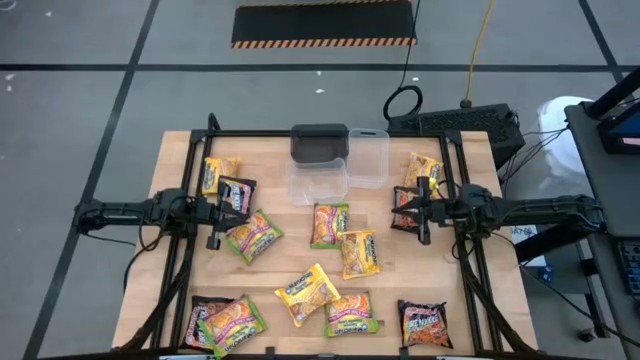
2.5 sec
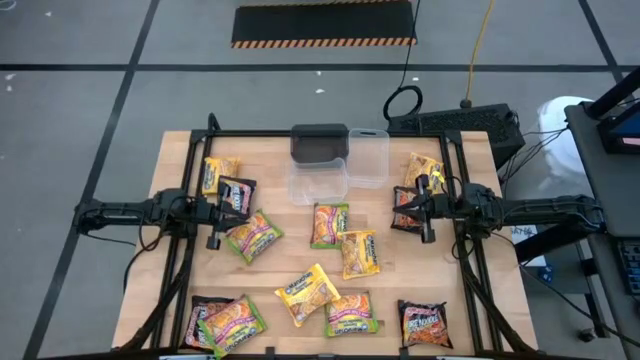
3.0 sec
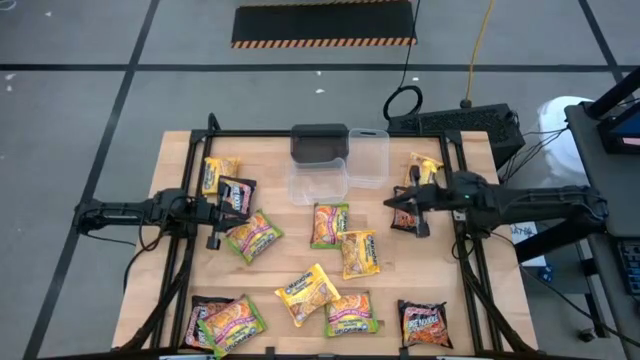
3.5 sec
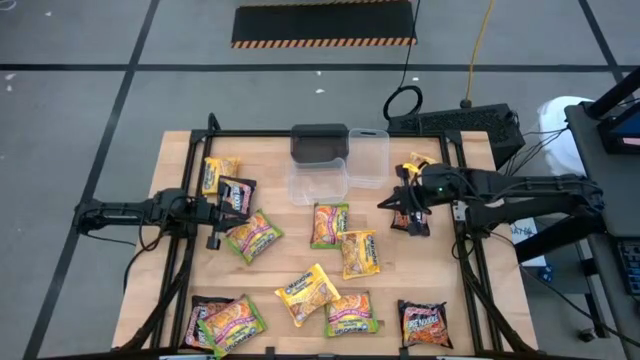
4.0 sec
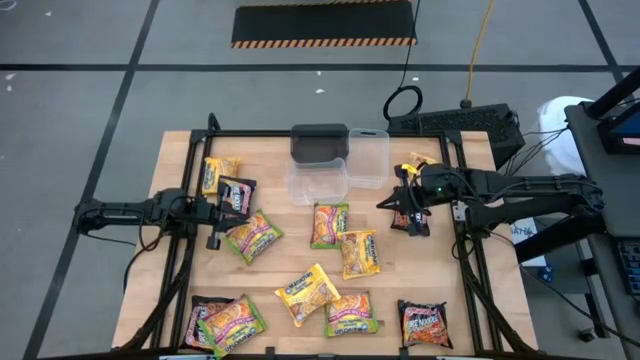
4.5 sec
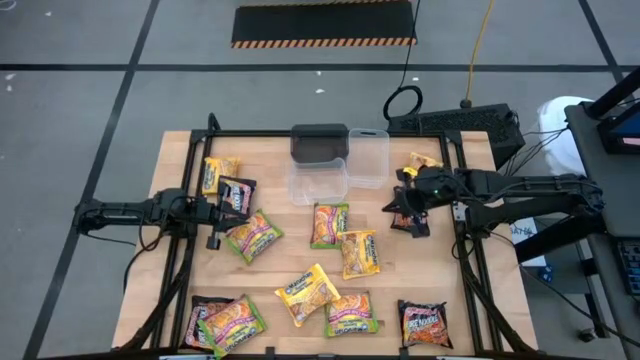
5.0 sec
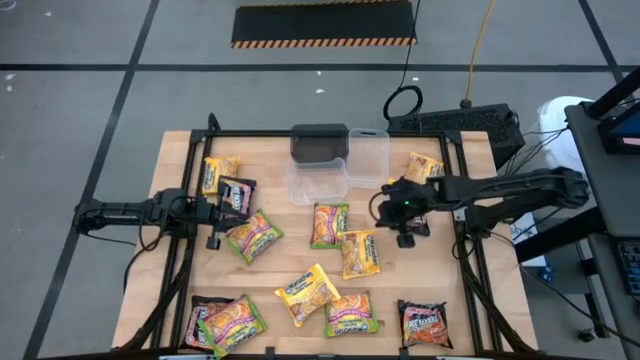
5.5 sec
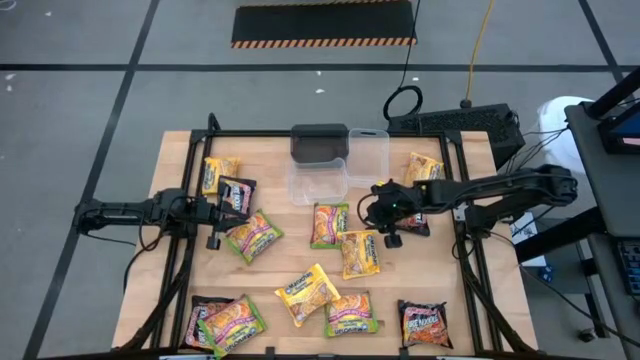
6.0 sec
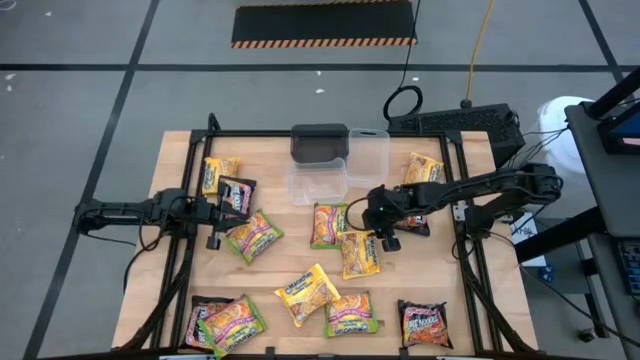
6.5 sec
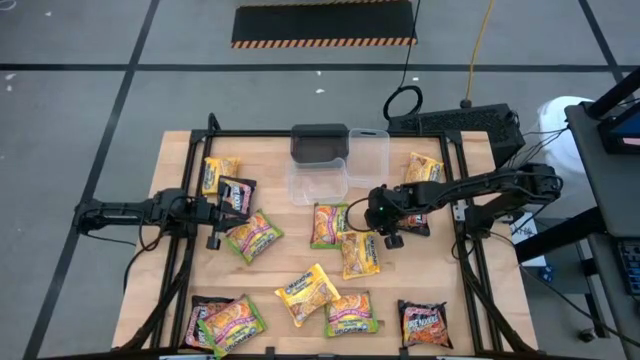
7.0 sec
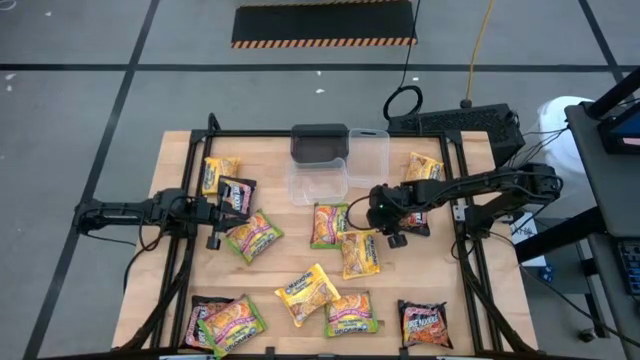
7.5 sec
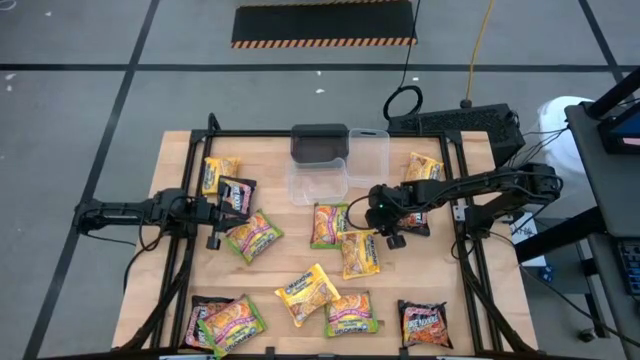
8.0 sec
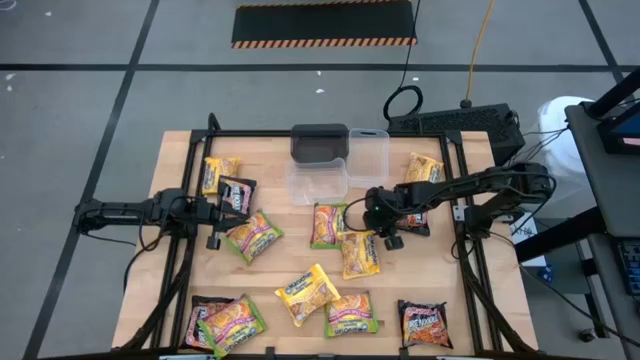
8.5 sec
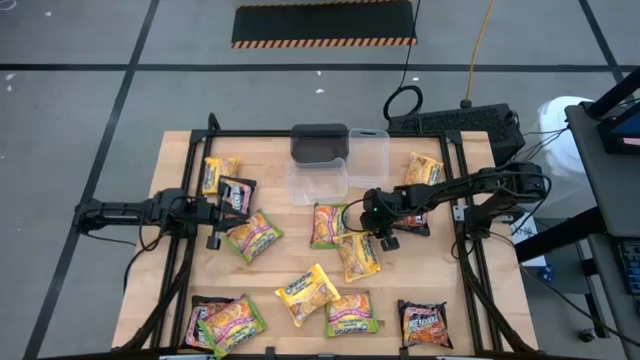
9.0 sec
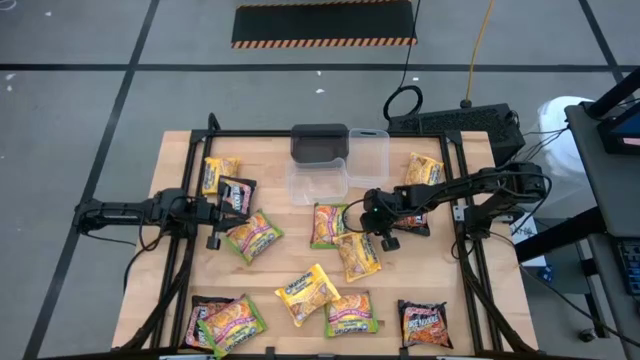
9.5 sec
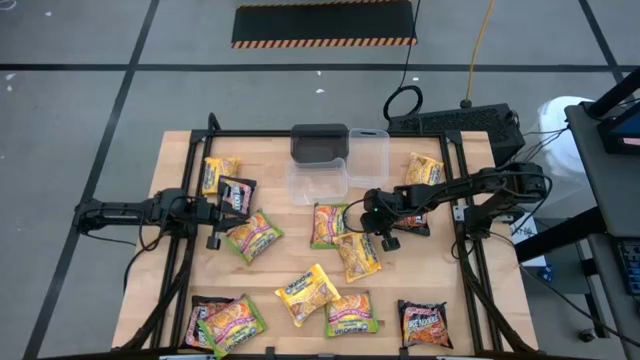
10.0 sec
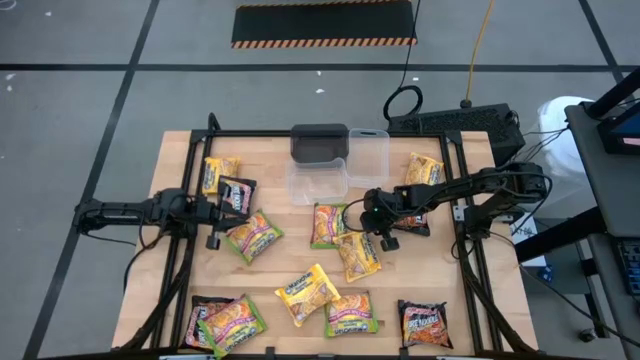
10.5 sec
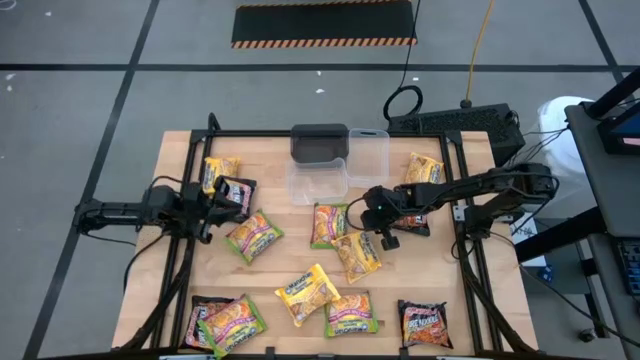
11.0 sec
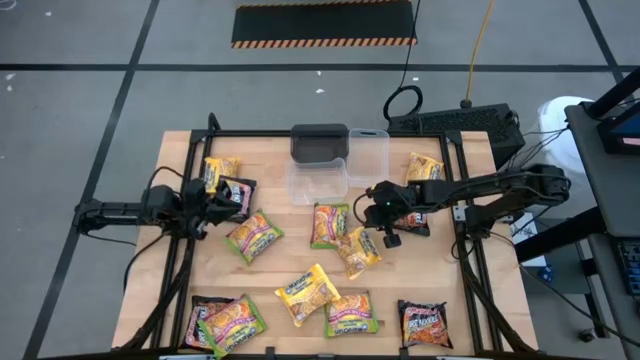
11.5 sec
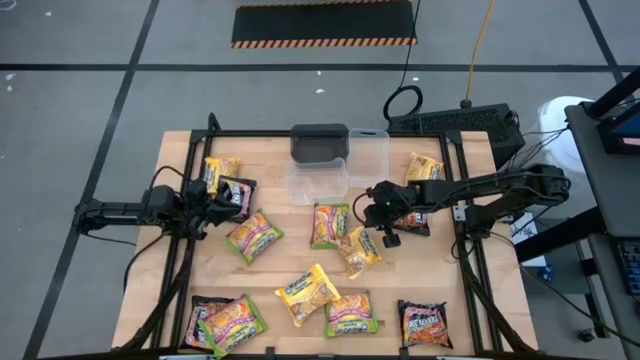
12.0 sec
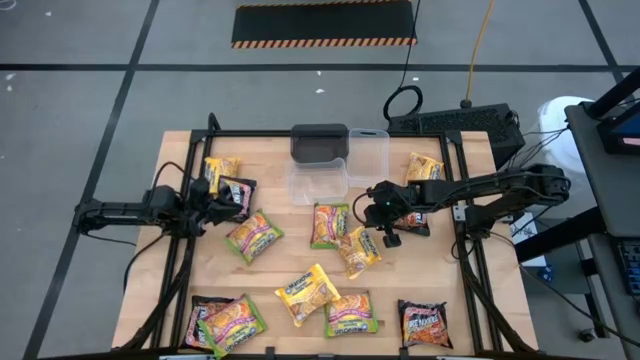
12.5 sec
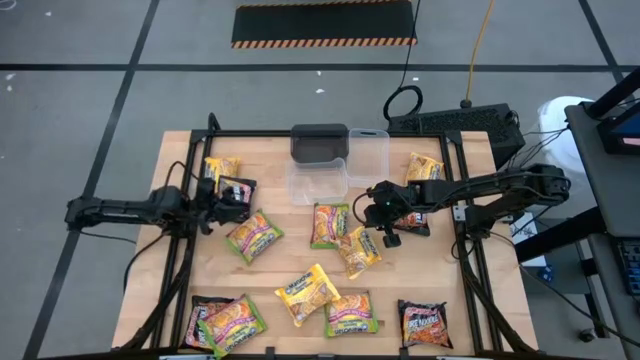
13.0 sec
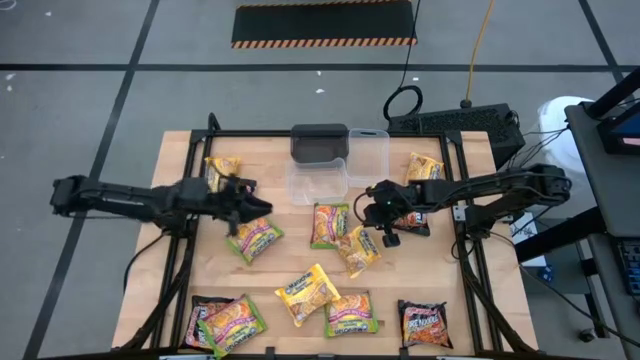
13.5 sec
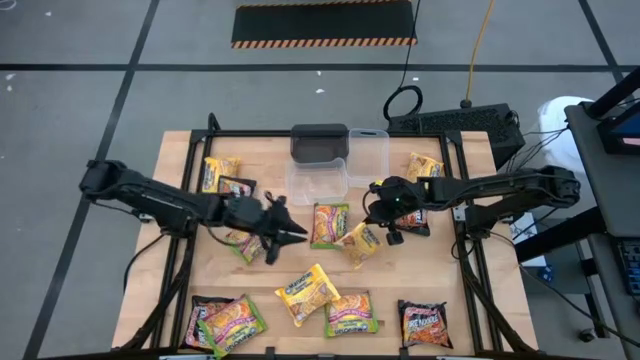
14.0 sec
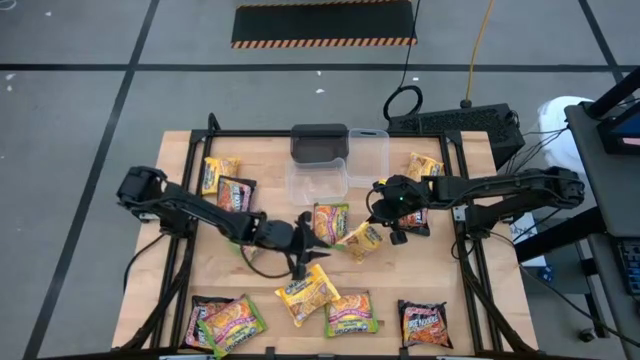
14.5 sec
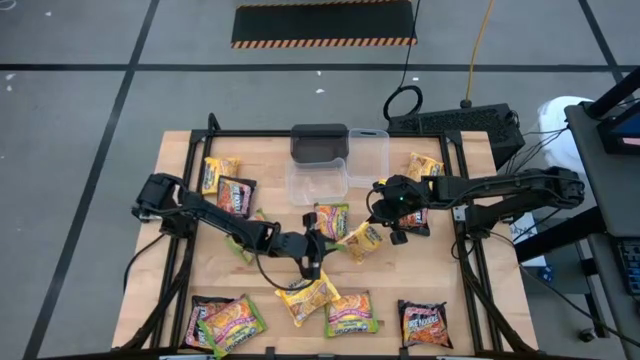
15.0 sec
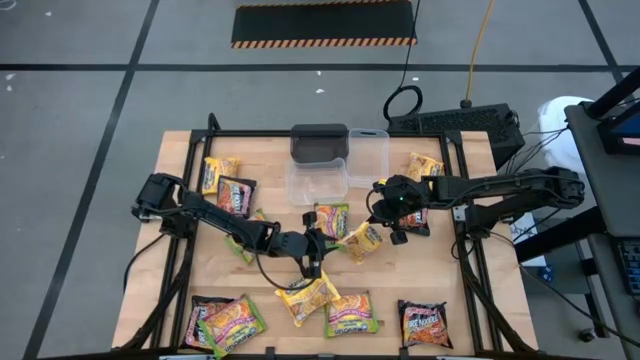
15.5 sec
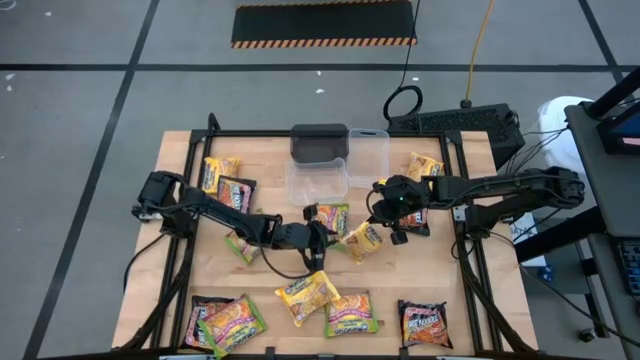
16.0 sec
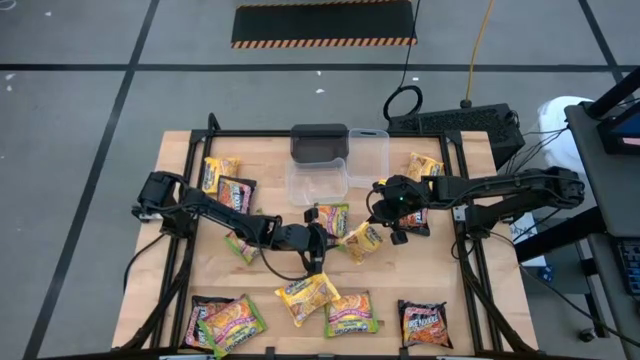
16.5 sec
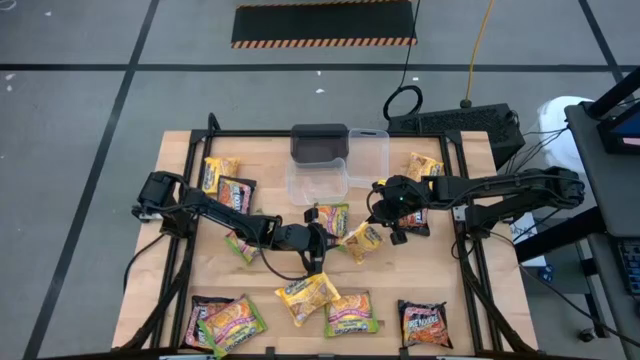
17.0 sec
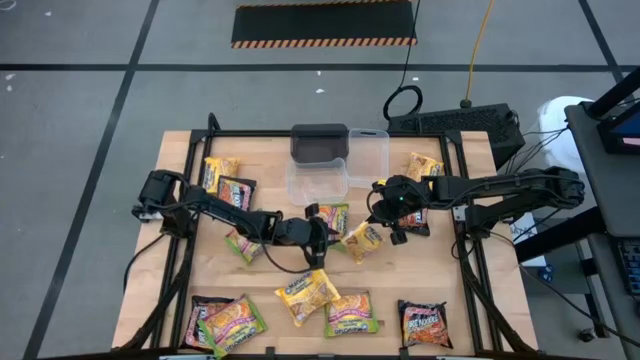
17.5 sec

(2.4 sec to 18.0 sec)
Task: Sort Maruchan noodles
Put the yellow noodle pack into the left transparent bin
